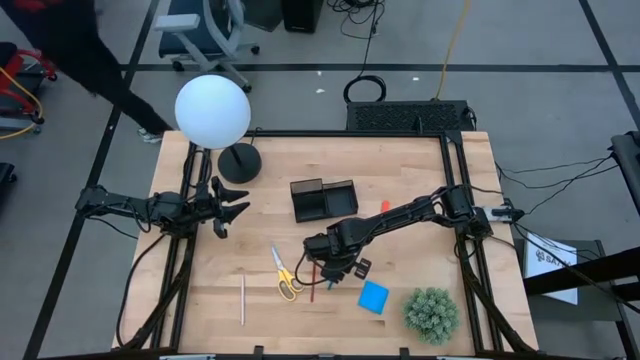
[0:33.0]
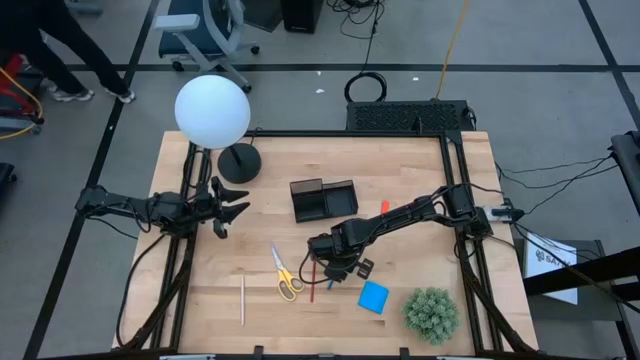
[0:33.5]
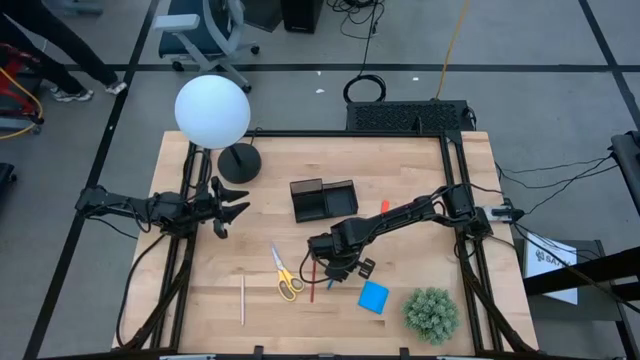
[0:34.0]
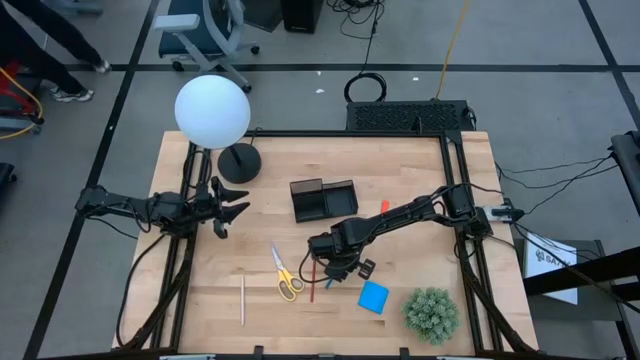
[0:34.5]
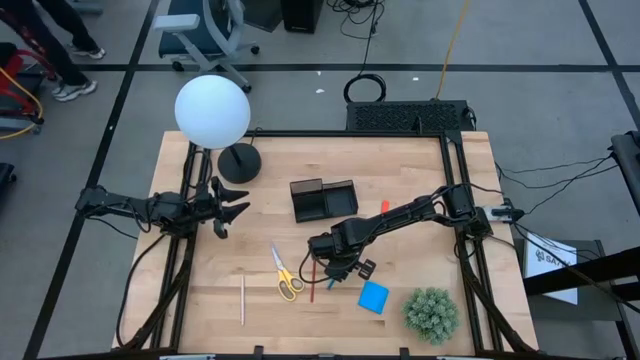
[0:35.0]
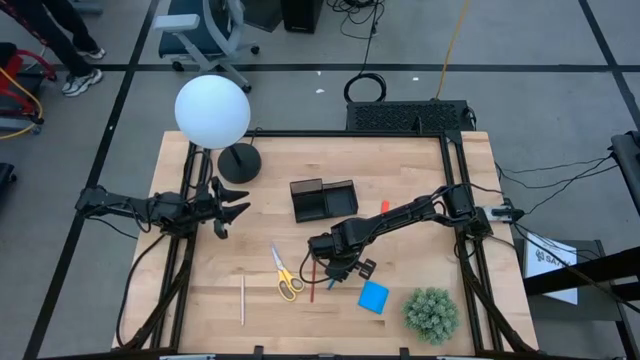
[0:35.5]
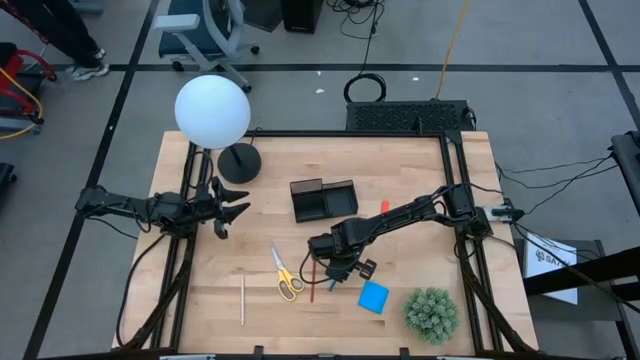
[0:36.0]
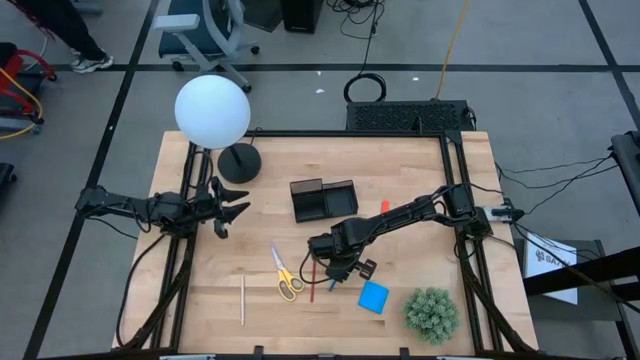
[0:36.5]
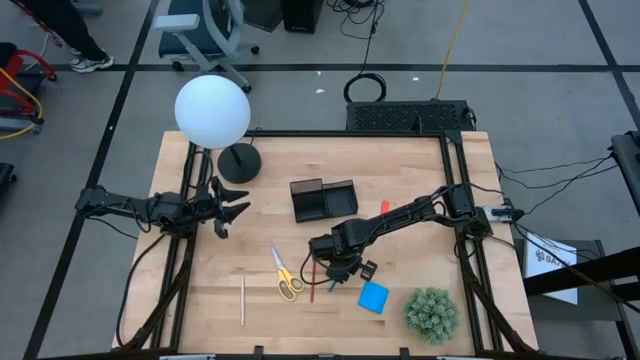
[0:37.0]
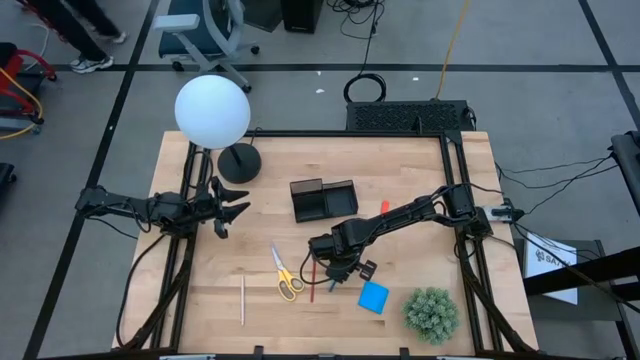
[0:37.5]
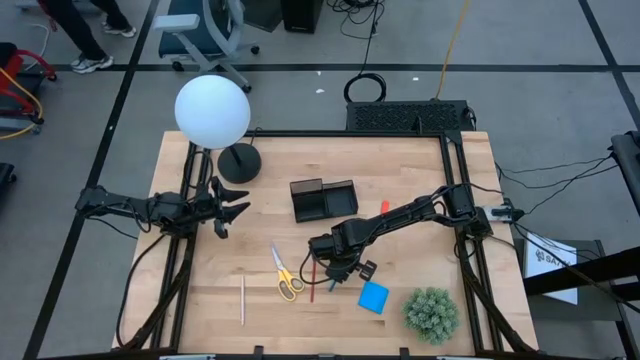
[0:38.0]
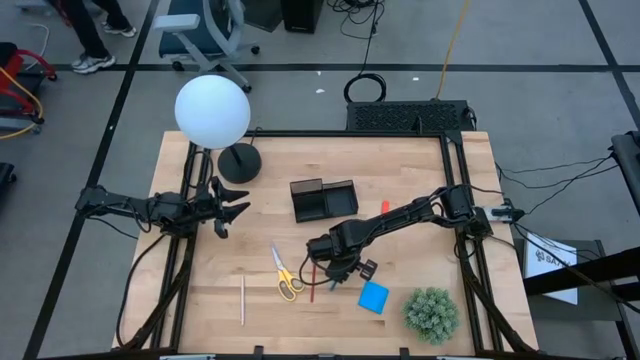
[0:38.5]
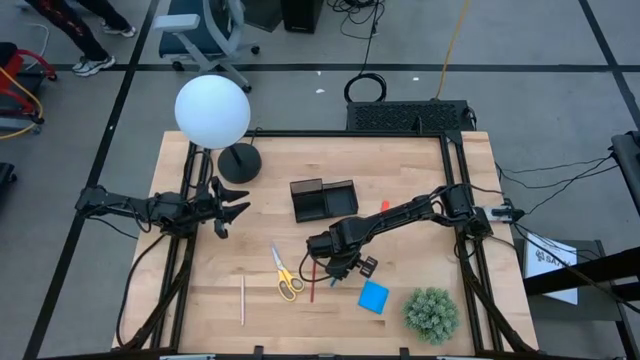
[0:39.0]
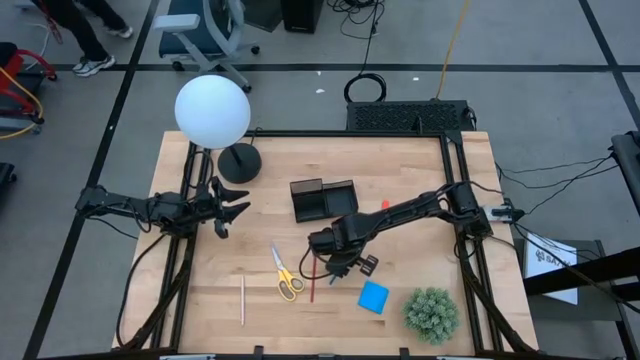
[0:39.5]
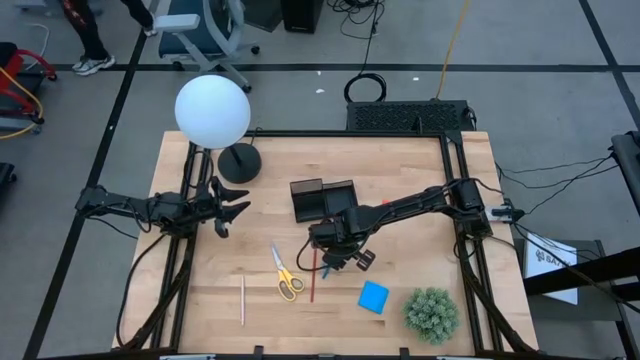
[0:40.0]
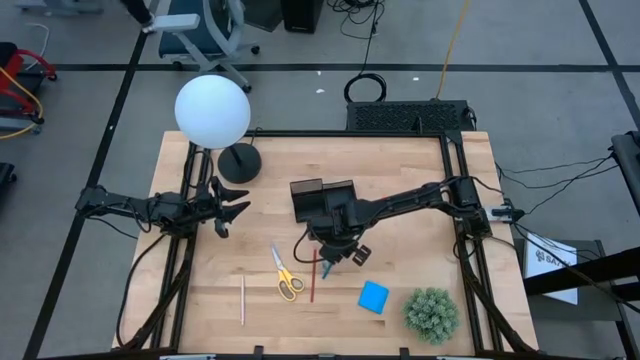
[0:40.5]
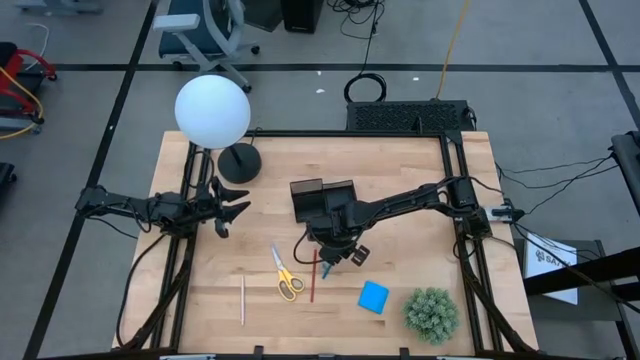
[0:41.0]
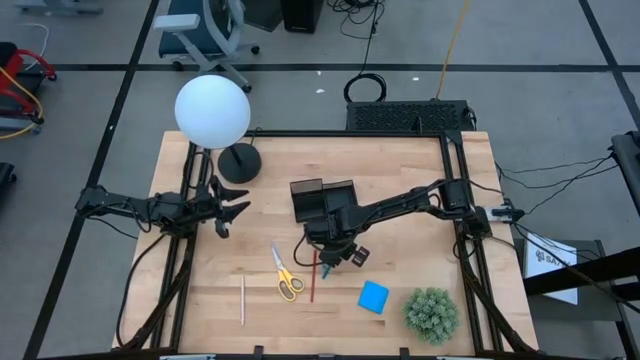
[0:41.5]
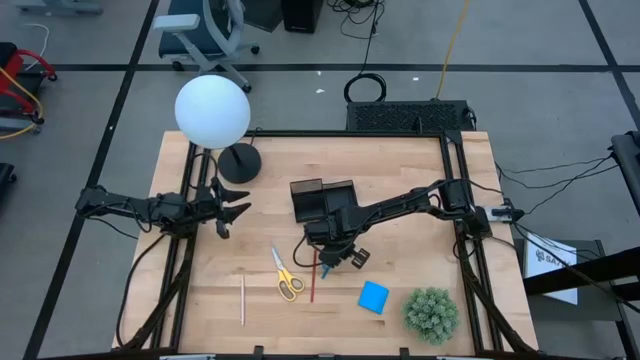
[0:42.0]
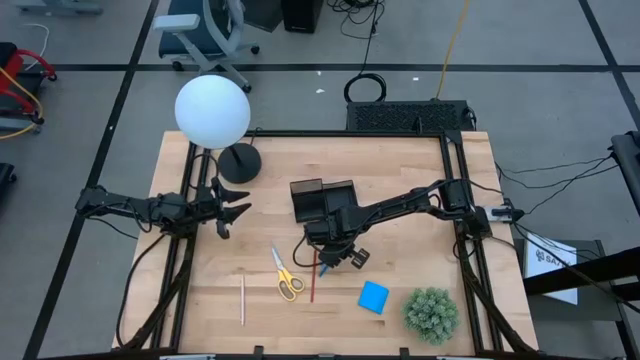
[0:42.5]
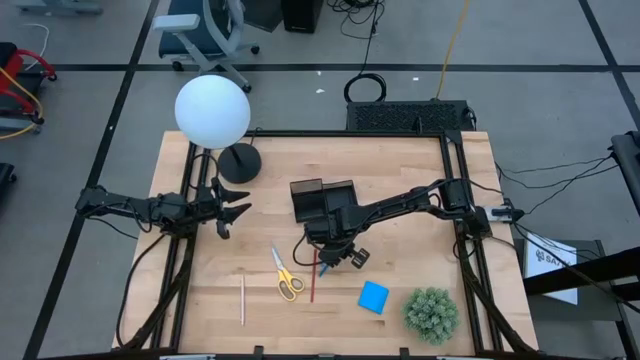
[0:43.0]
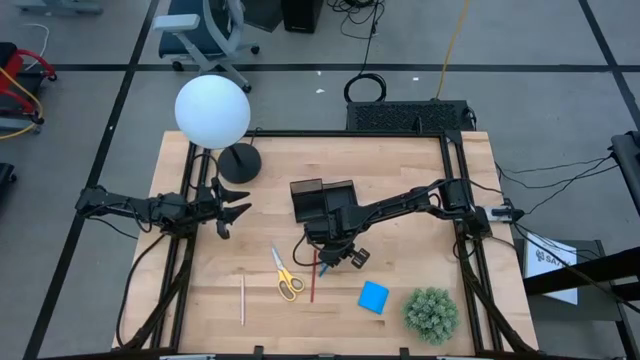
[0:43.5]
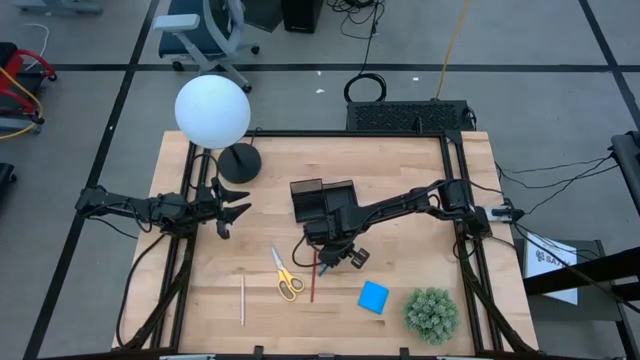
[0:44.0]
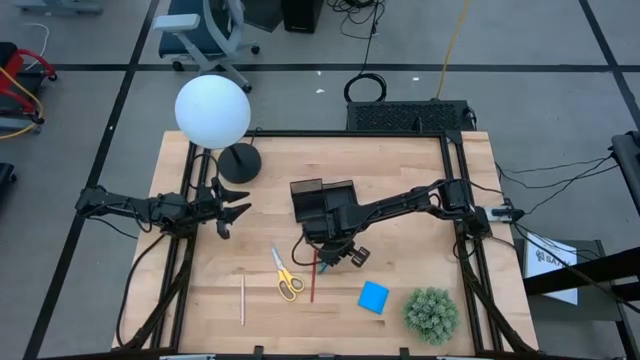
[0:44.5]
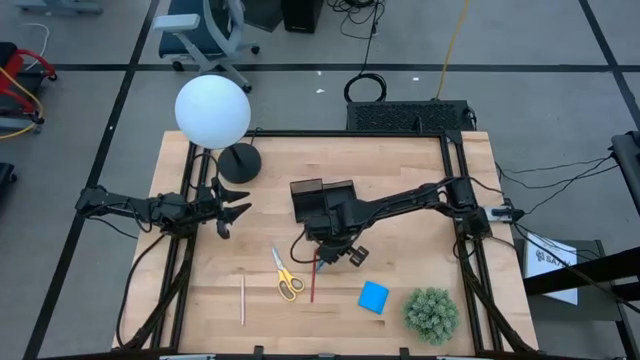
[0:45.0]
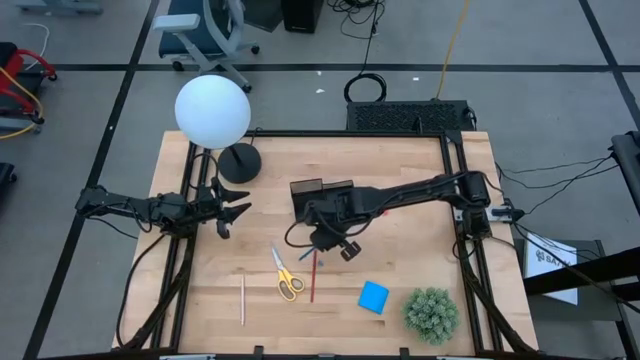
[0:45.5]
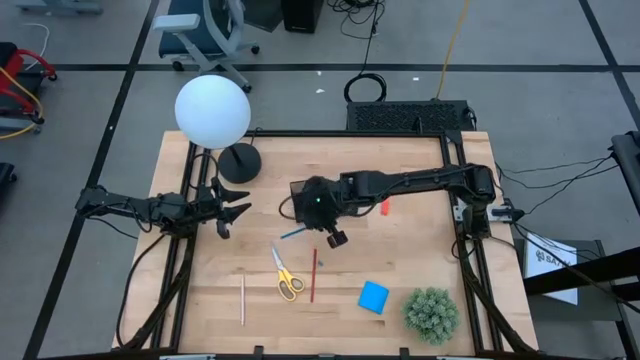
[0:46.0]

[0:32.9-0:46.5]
Task: Pick and place office supplies into organizer
Put the blue pencil into the desk organizer
